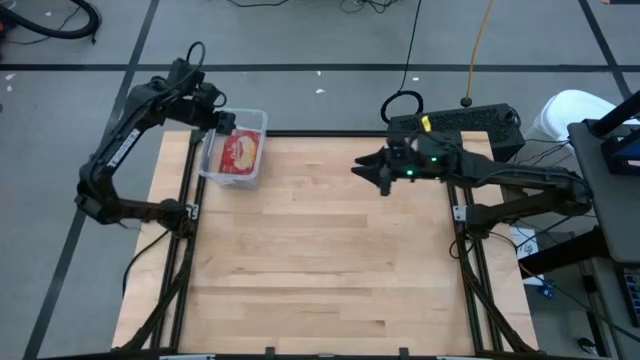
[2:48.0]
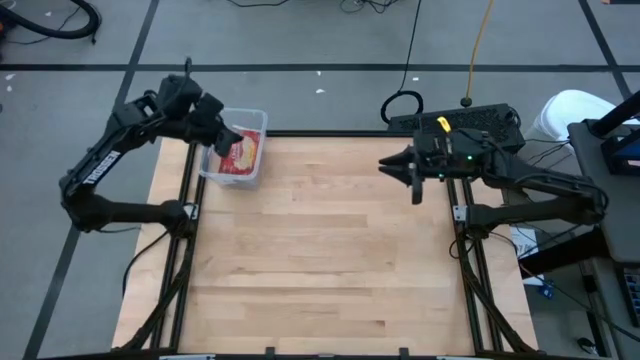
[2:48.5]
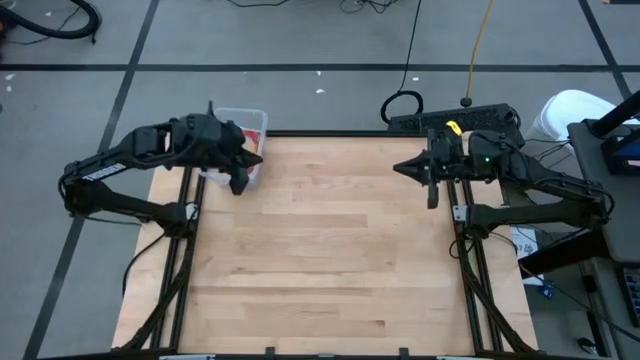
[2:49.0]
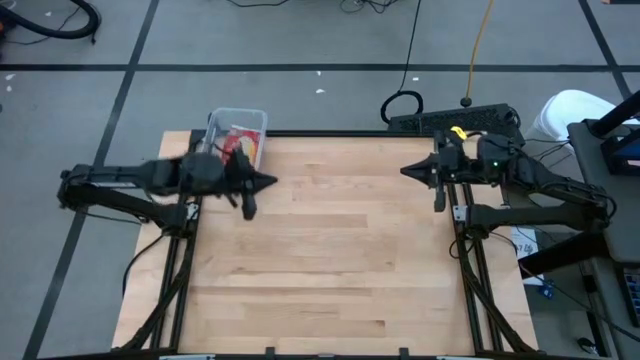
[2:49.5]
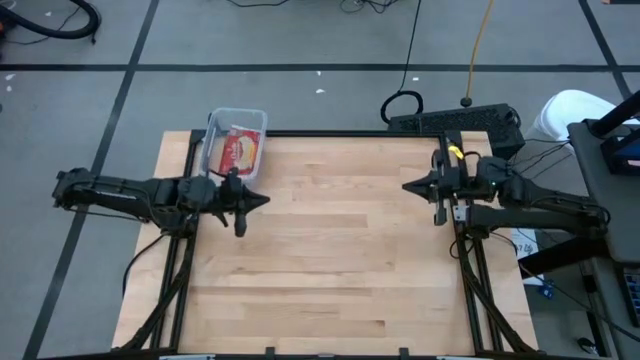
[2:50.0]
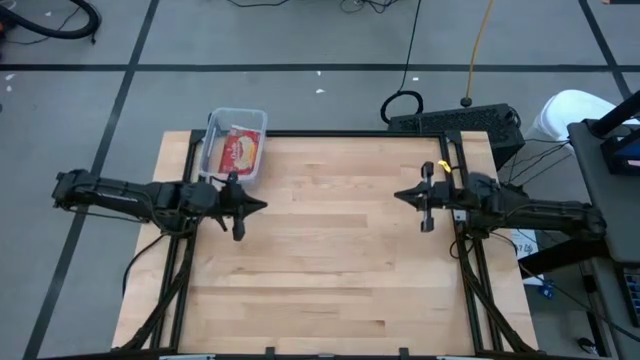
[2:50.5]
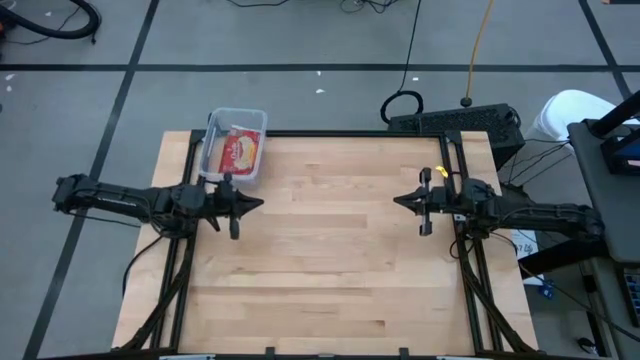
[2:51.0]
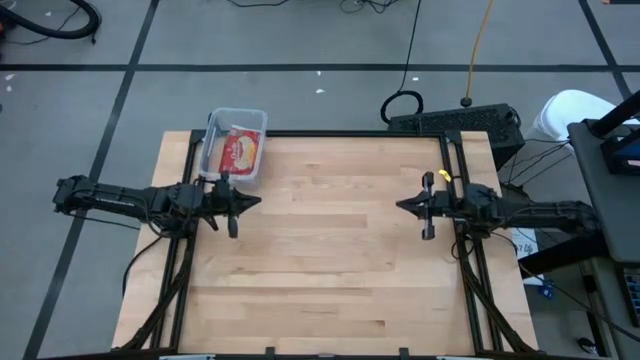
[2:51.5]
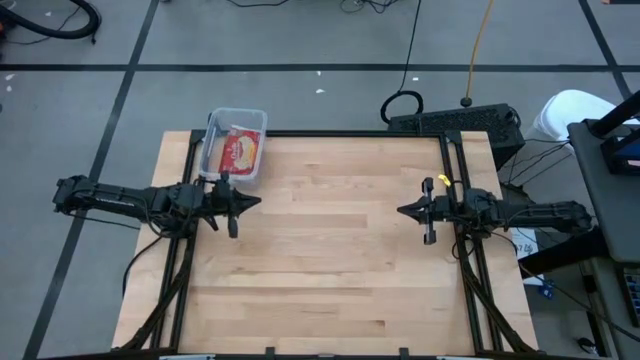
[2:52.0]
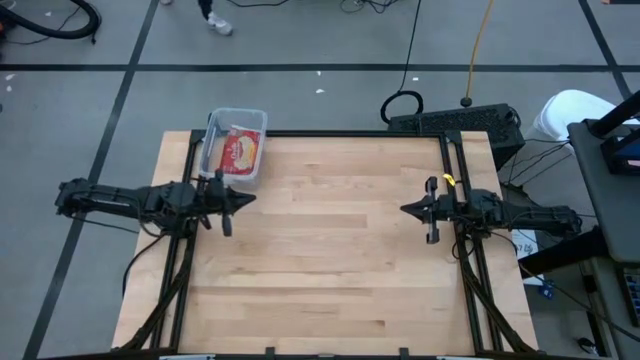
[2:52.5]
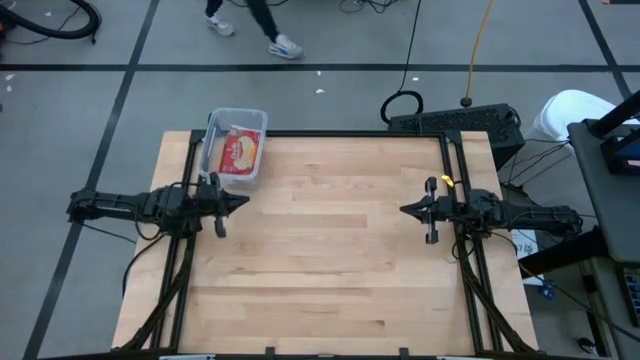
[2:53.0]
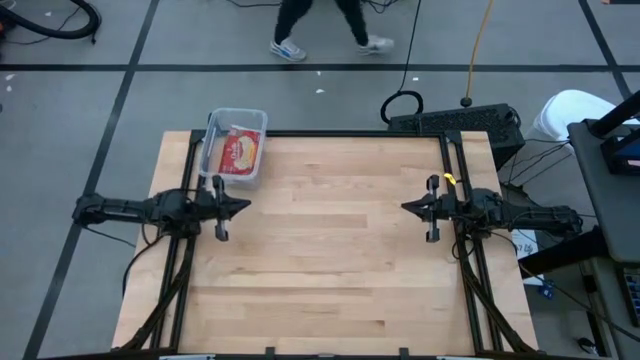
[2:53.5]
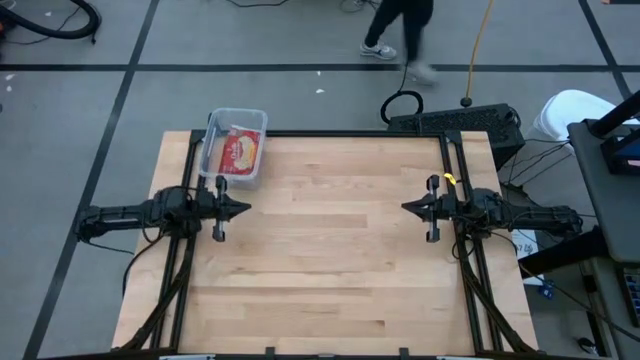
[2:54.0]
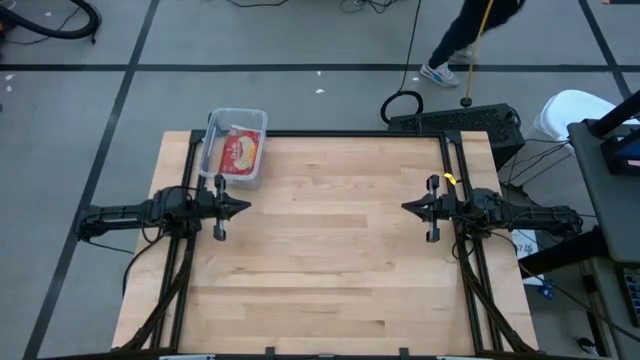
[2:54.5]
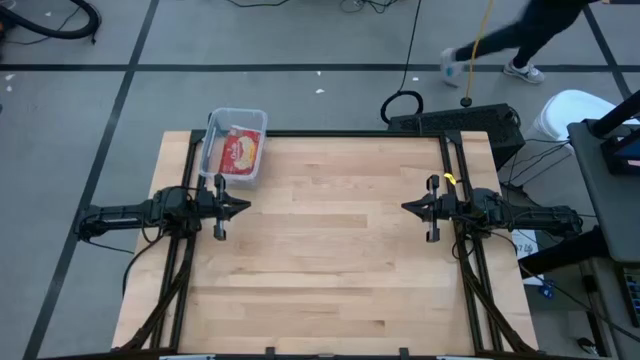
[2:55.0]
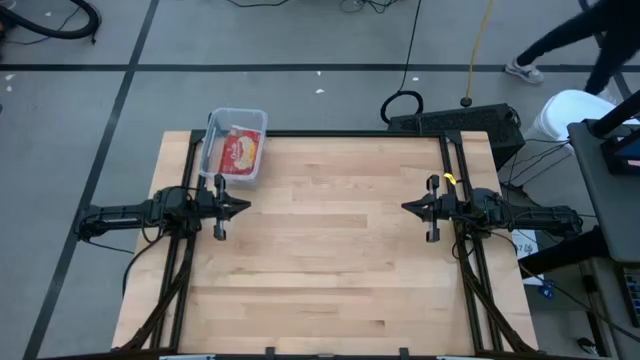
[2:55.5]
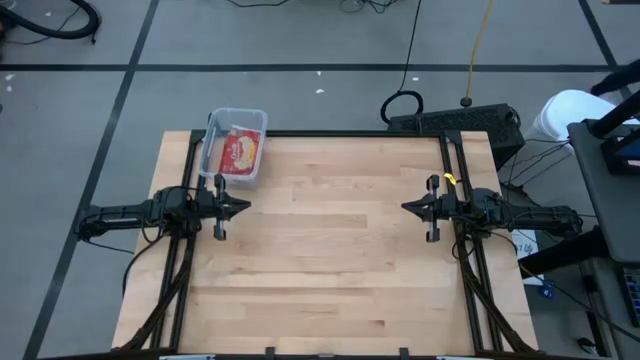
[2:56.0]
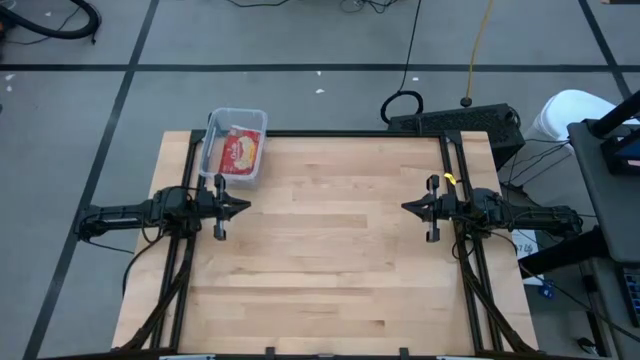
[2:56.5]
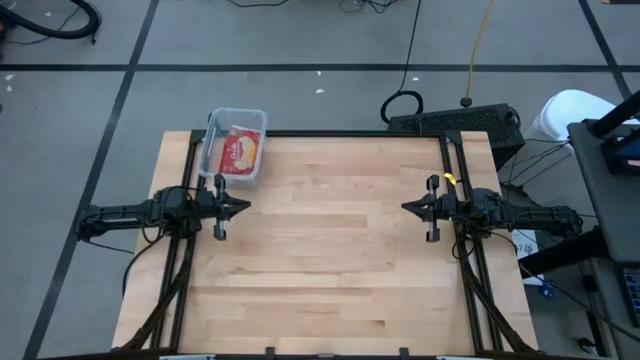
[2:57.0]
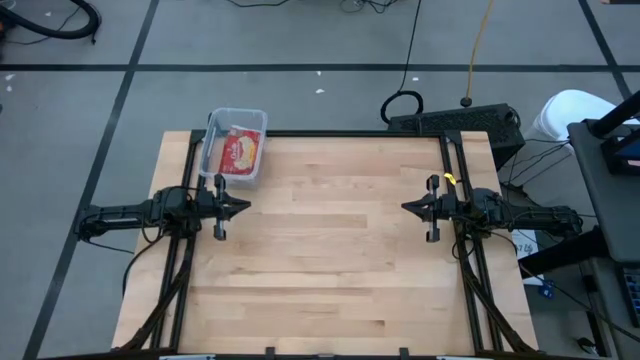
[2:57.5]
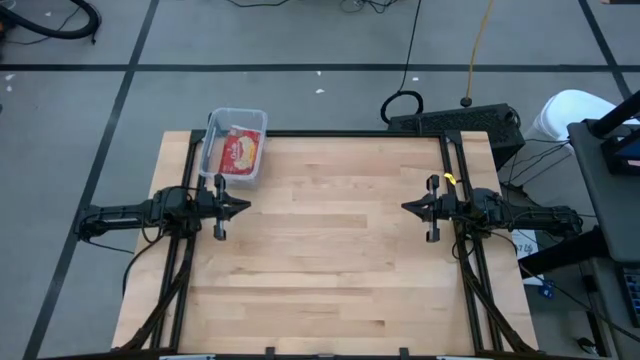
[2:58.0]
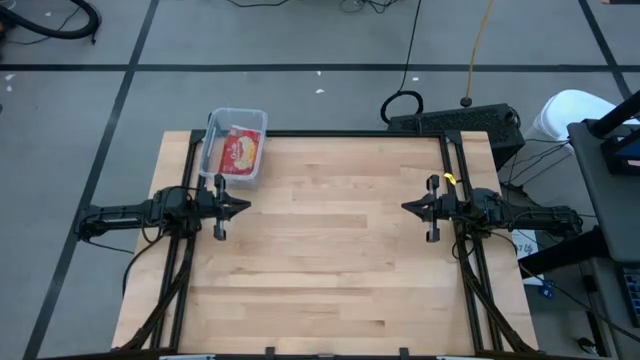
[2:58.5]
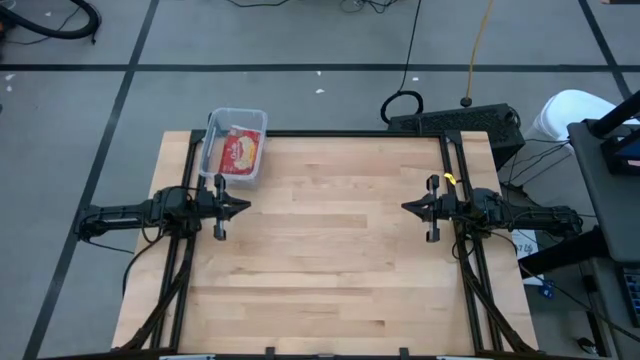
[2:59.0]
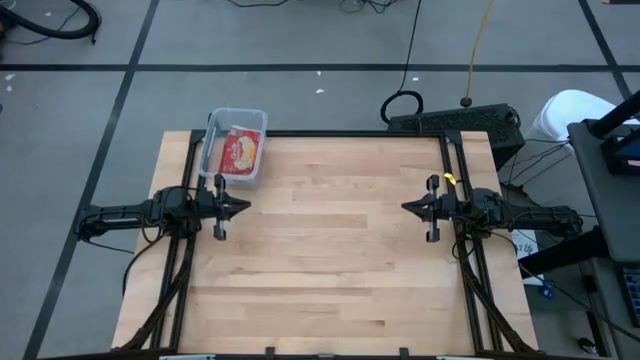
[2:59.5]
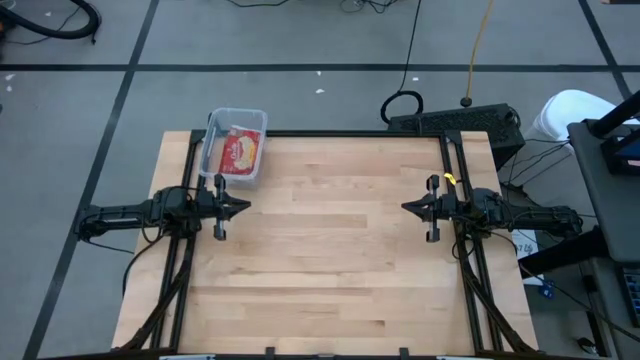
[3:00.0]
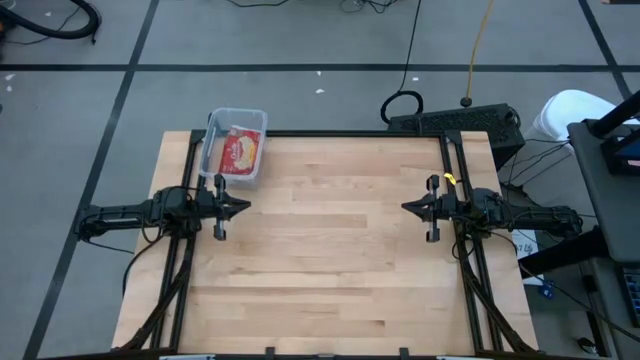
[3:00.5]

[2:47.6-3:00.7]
Task: Sort popcorn bags into baskets
Return to Home Position

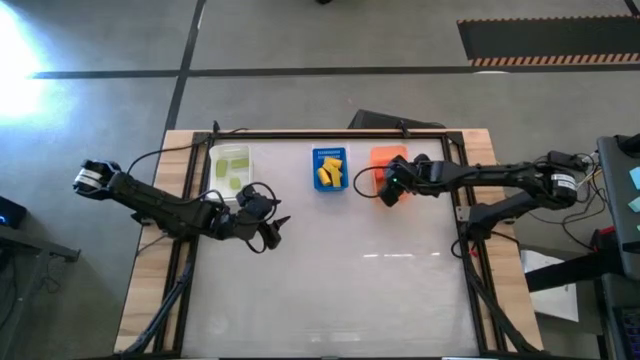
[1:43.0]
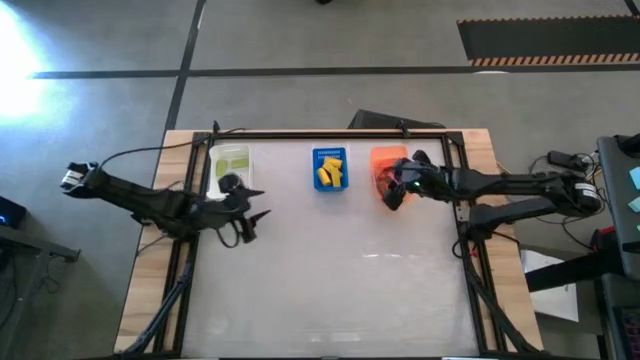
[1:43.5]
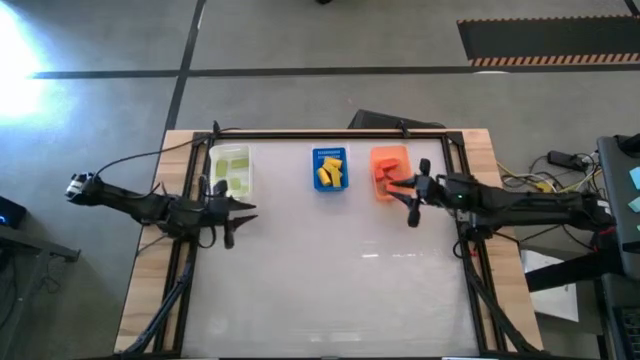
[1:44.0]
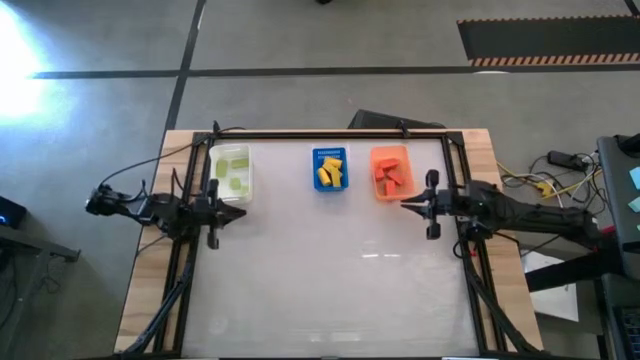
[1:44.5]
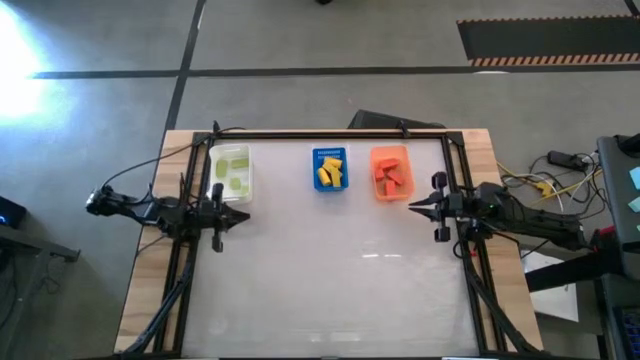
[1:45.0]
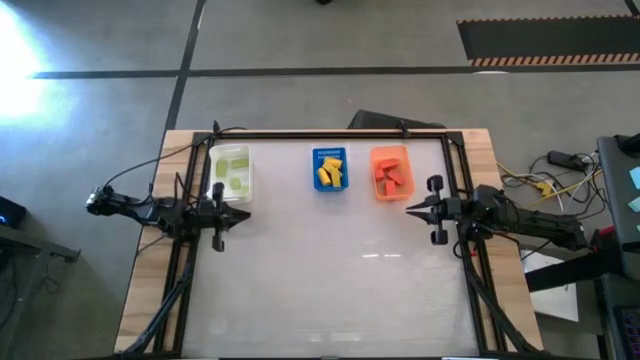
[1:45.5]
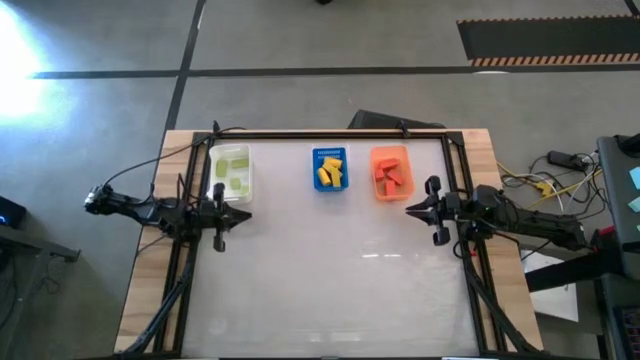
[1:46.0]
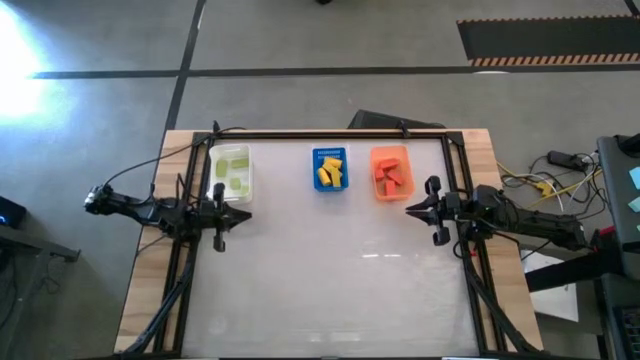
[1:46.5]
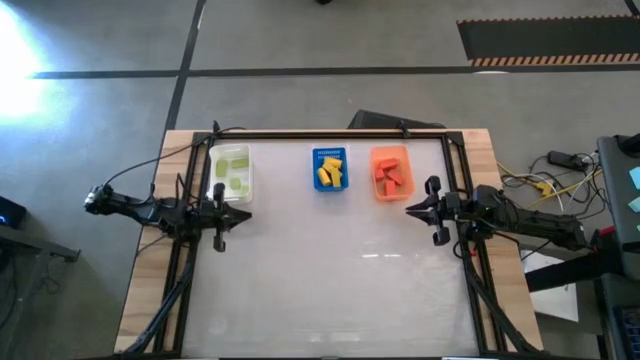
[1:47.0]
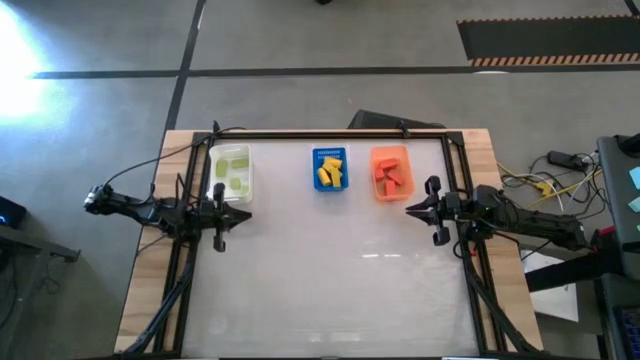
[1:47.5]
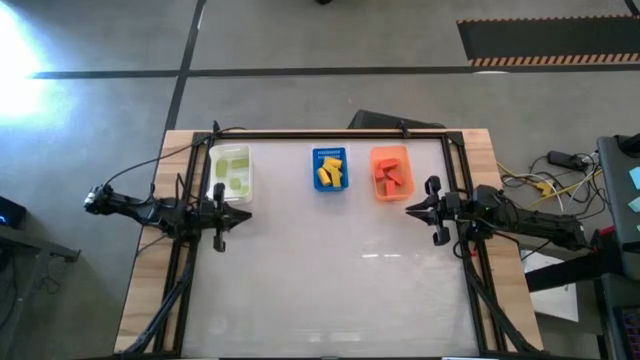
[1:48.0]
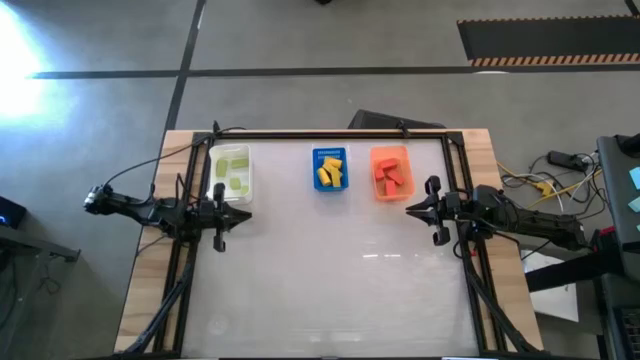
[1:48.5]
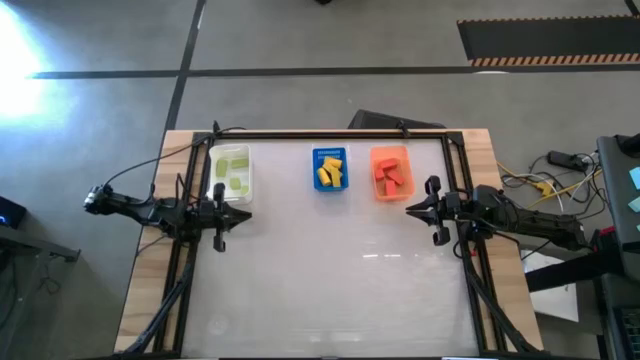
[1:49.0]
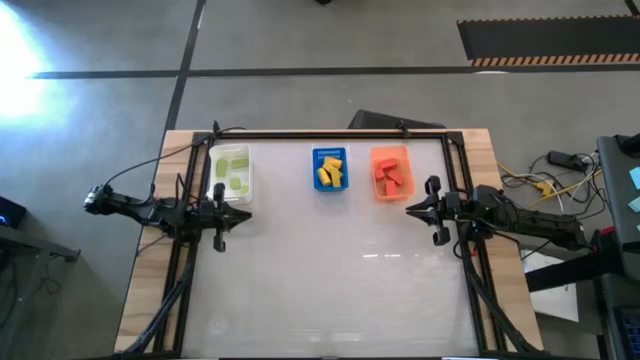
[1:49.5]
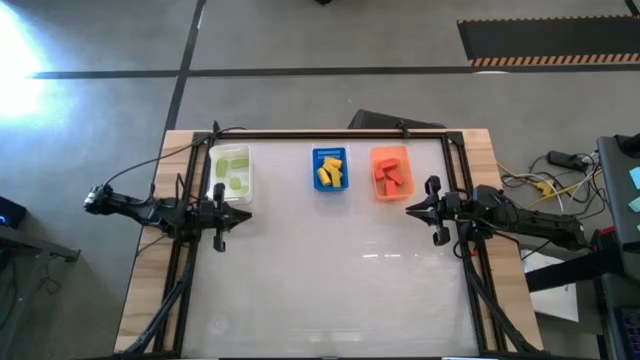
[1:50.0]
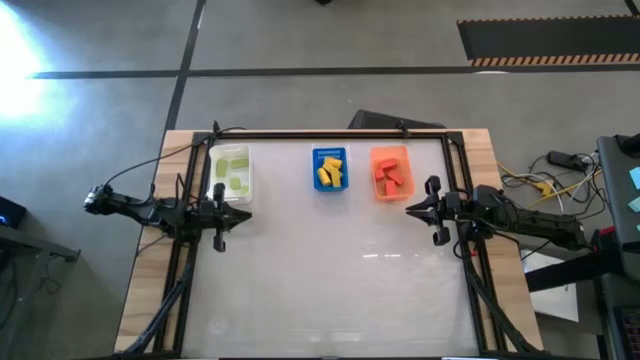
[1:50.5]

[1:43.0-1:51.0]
Task: Sort & place blocks by color
Return to Home Position
